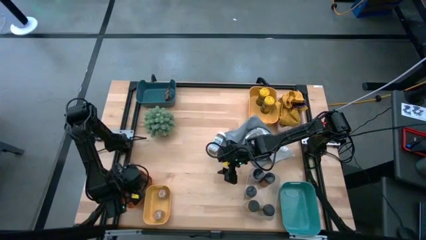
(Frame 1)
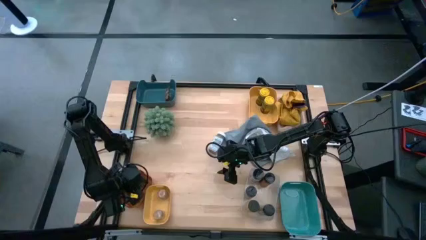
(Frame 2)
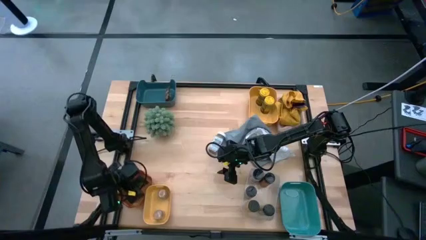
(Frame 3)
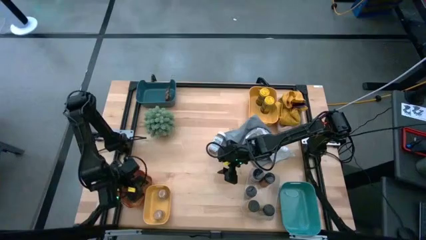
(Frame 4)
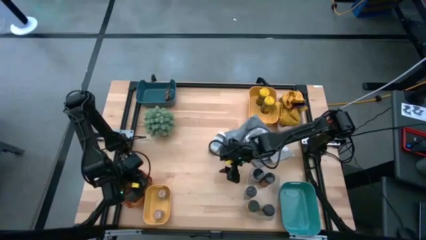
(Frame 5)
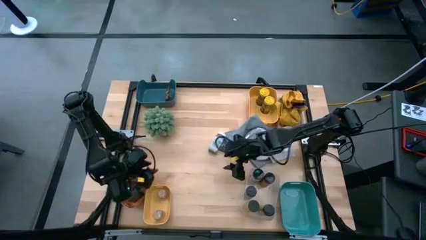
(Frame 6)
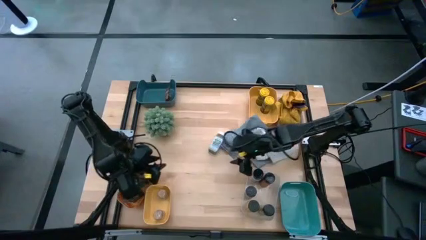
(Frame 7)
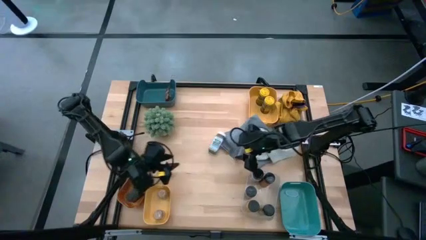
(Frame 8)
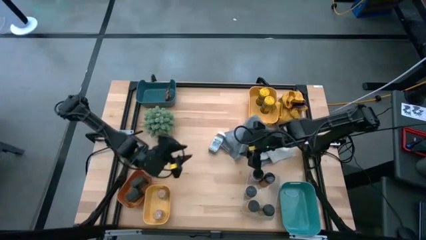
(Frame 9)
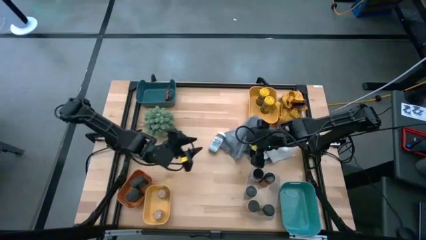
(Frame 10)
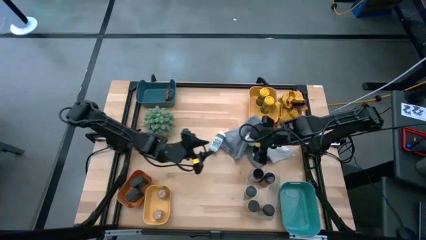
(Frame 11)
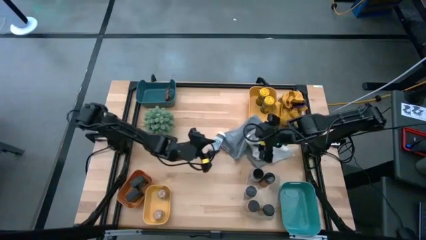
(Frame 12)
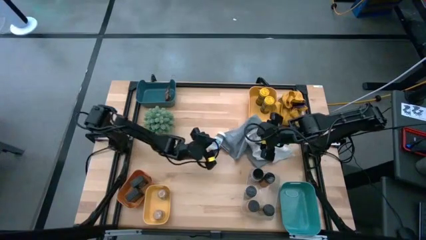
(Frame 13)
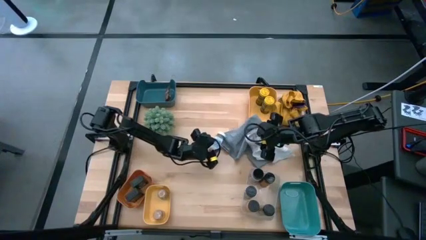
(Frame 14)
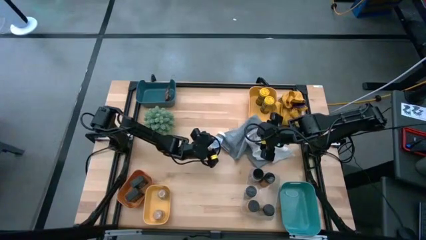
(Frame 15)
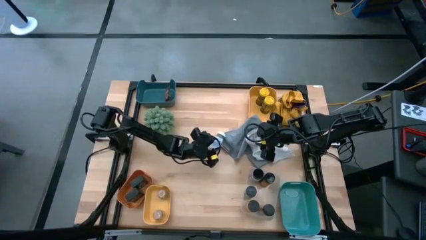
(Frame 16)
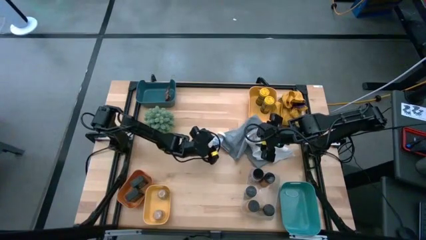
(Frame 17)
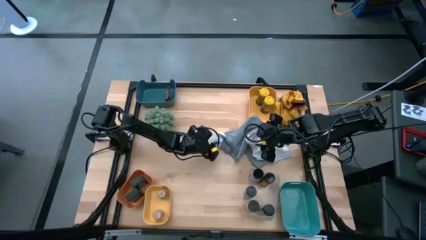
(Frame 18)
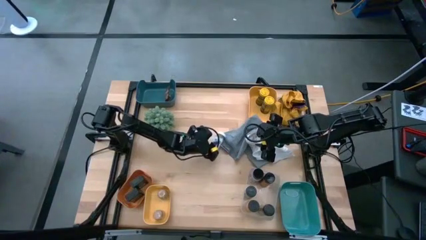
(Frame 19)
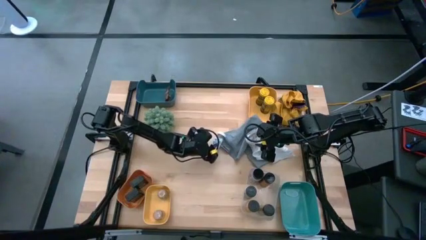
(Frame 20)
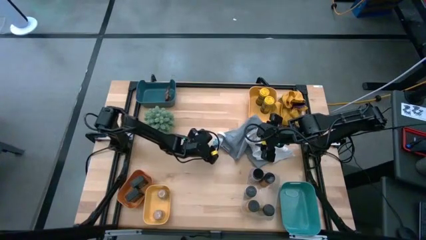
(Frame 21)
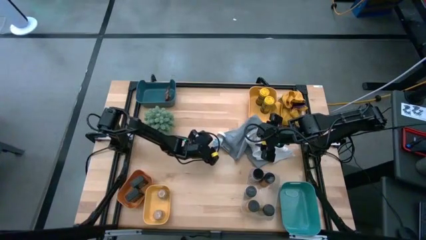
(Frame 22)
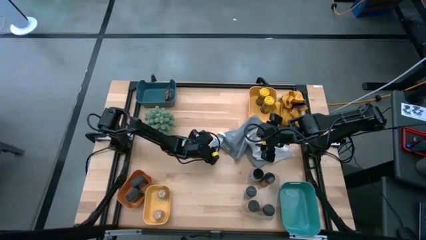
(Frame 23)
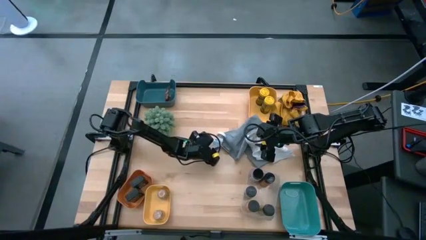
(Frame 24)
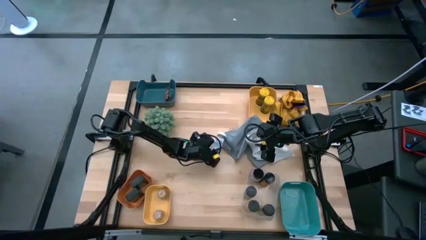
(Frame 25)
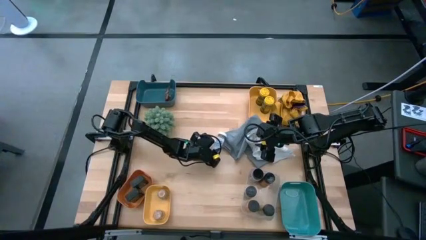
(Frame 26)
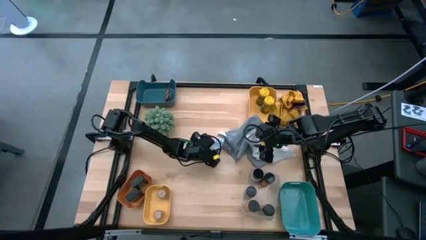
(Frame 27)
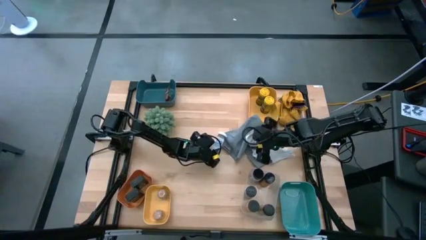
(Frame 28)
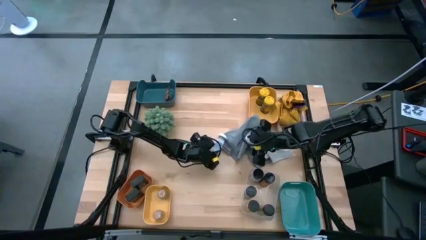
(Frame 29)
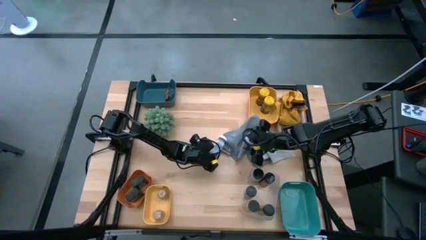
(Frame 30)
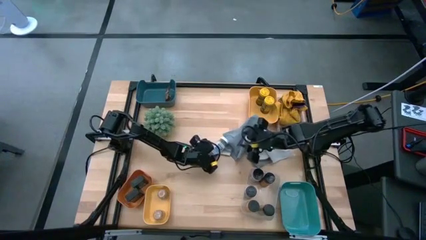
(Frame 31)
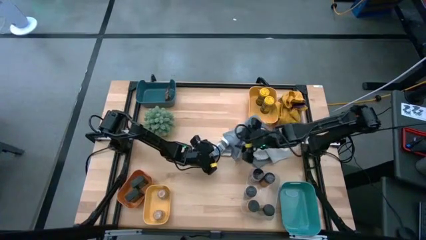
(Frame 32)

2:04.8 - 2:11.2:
Task: Sort spices by type
Put the white seasoning bottle into the green bin

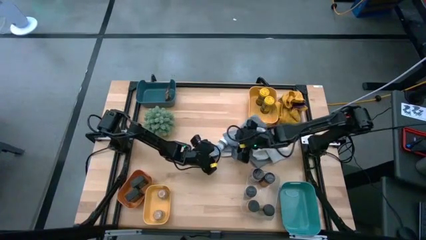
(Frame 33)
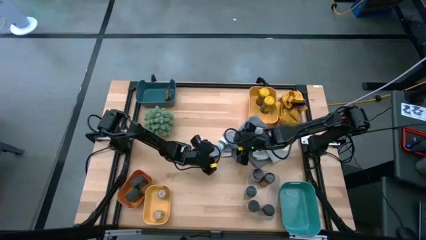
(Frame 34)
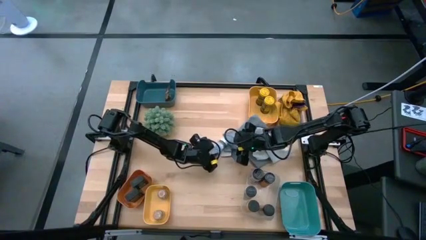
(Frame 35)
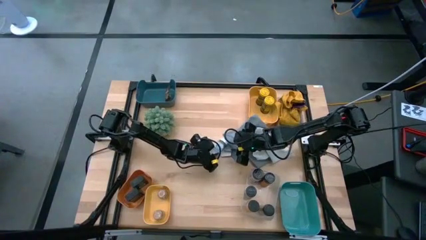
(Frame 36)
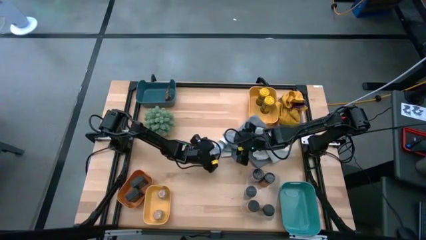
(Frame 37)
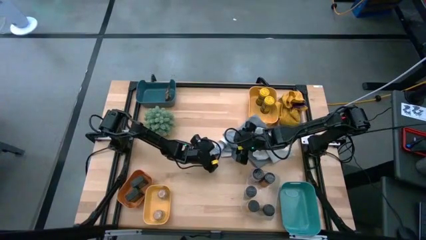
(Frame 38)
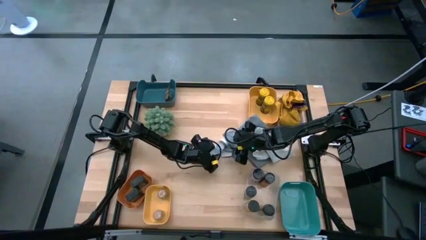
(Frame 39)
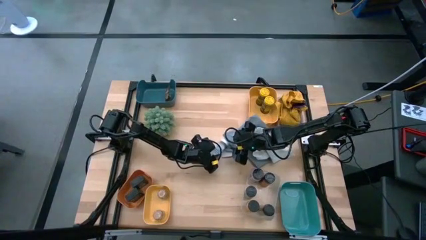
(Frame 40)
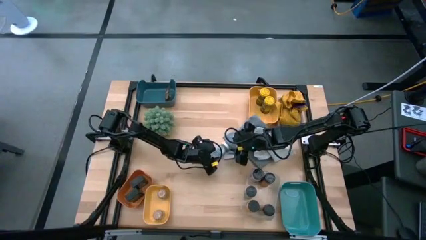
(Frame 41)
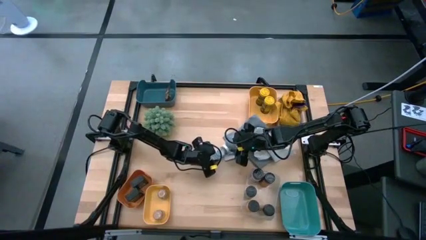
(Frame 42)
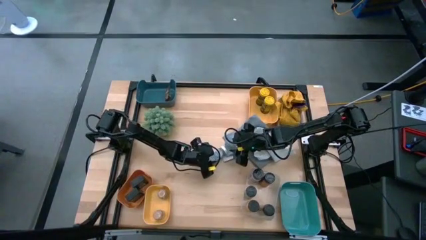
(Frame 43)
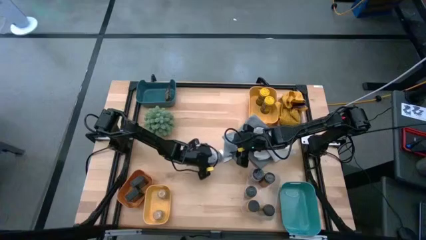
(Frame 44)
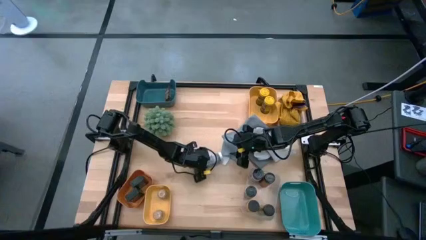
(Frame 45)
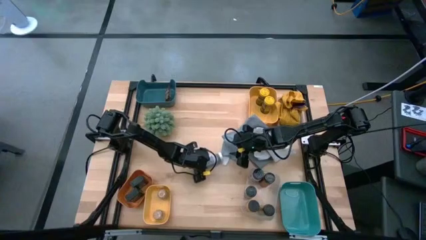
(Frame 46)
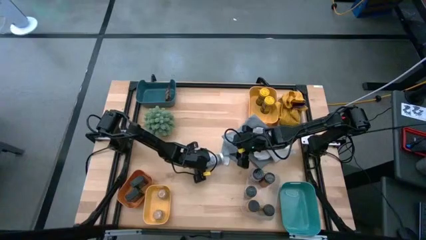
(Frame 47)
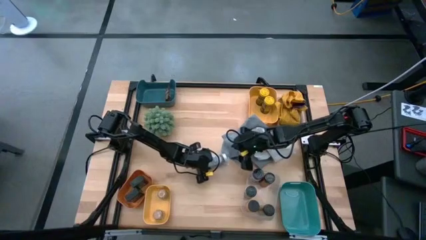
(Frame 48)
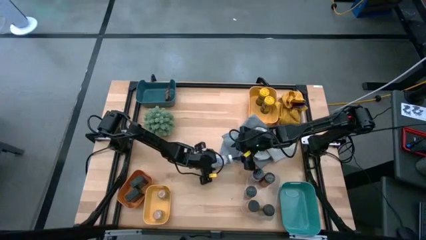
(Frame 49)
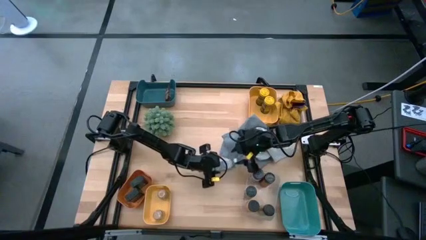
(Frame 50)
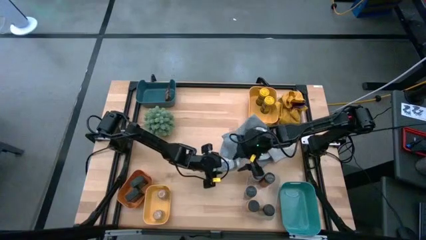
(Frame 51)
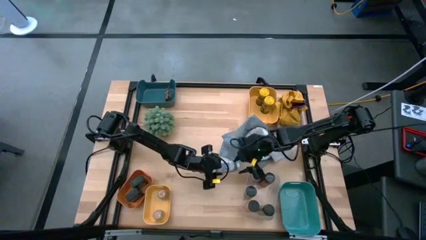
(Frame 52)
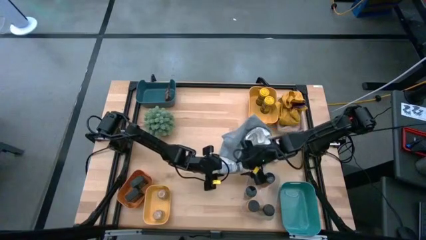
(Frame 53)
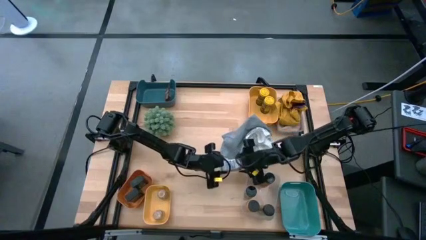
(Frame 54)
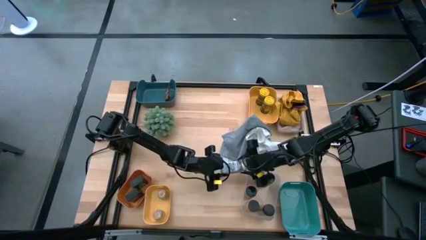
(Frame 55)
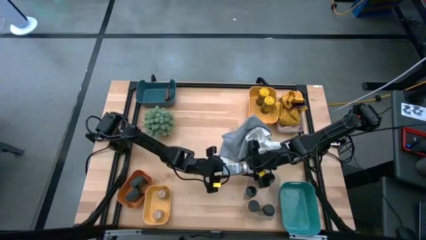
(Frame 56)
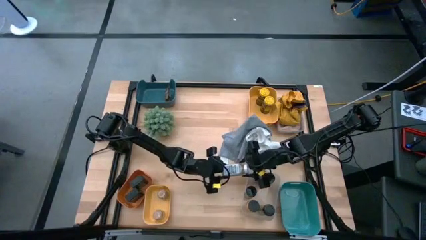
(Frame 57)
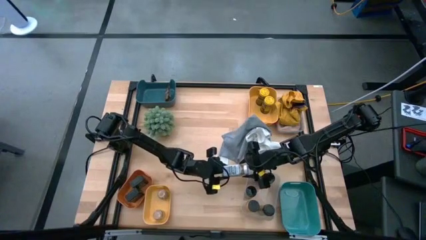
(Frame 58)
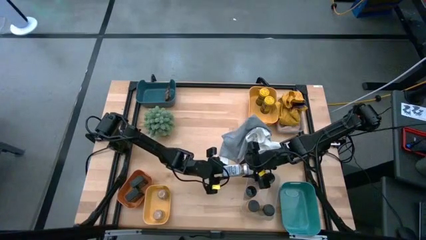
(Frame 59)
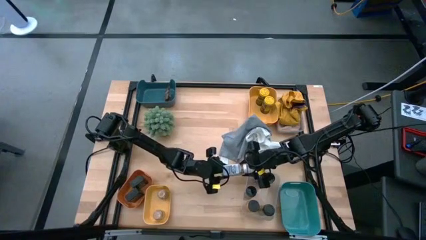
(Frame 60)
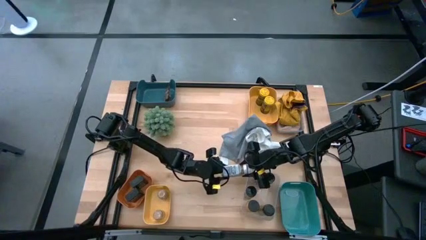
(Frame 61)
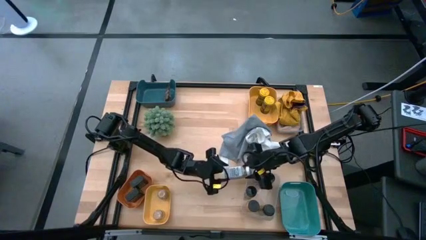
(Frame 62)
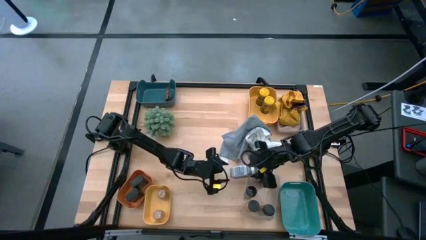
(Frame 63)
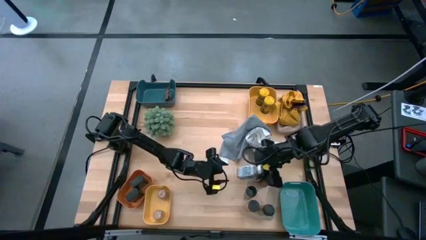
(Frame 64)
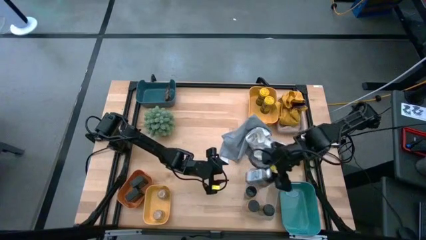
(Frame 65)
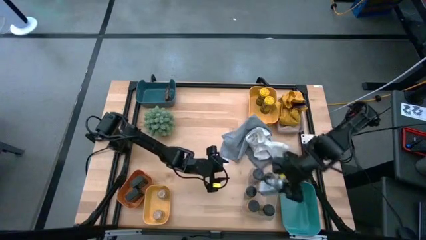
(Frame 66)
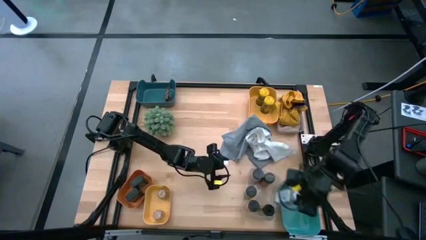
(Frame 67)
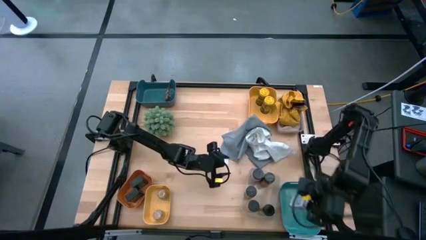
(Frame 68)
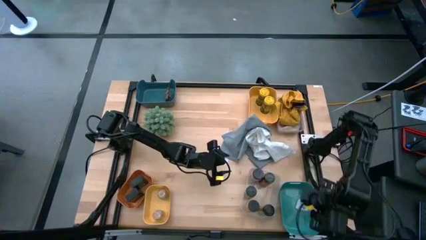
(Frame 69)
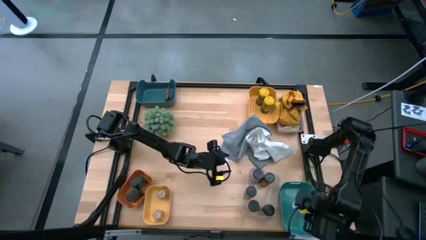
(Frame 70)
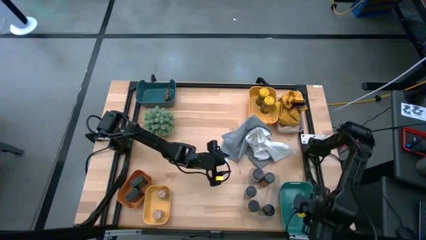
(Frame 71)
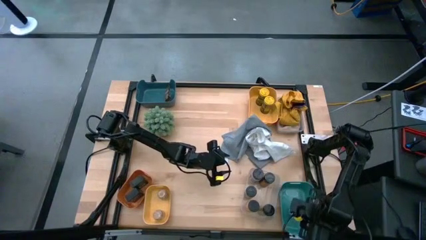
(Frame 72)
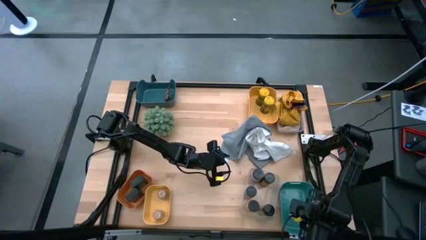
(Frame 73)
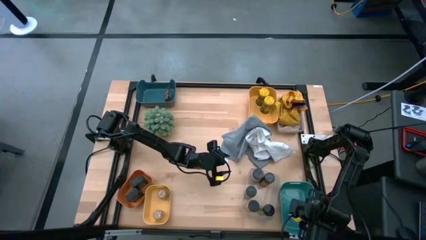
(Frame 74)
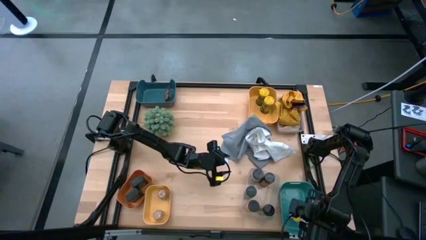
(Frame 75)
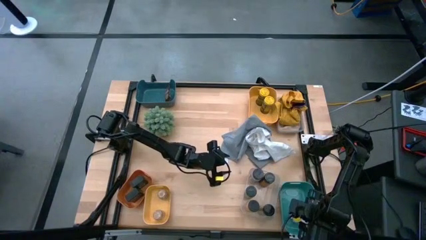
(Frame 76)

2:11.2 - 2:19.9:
Put the white seasoning bottle into the green bin
